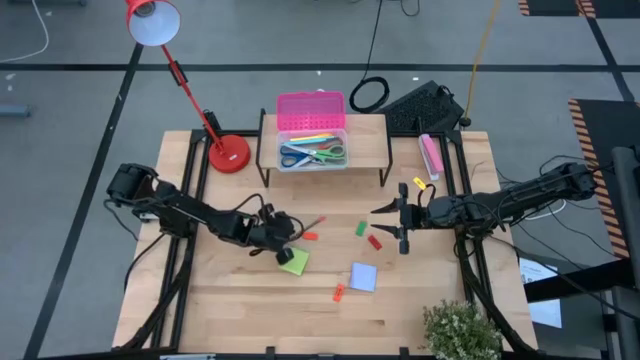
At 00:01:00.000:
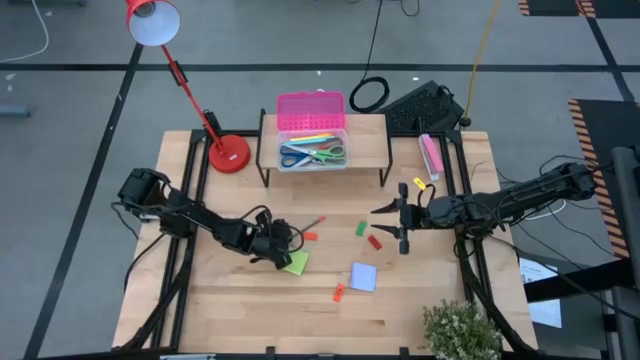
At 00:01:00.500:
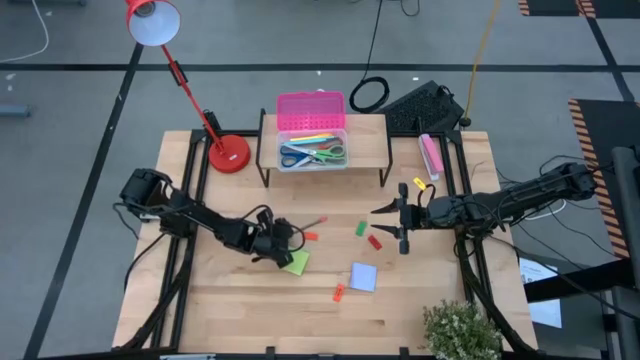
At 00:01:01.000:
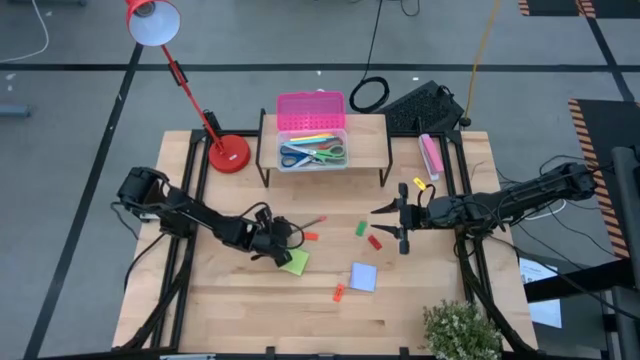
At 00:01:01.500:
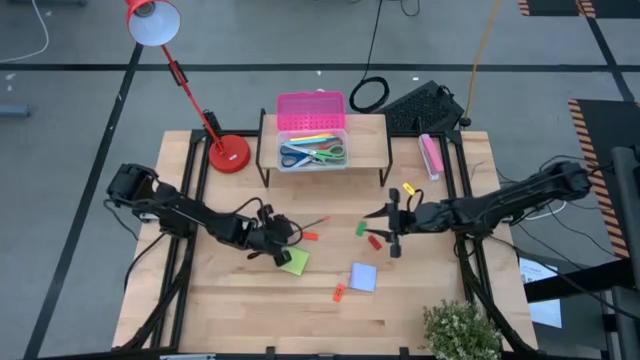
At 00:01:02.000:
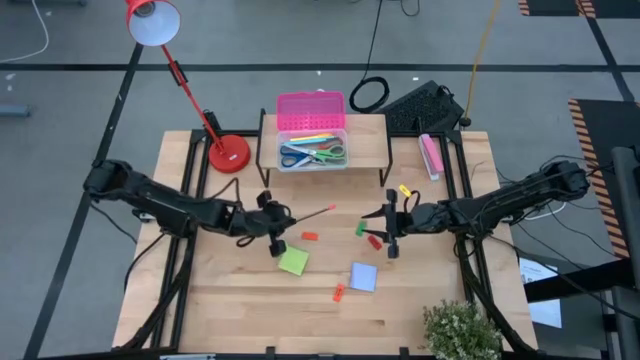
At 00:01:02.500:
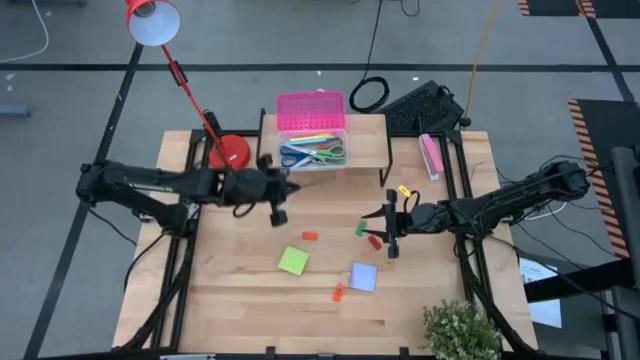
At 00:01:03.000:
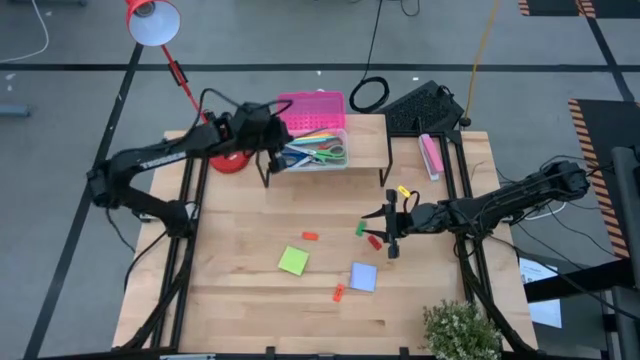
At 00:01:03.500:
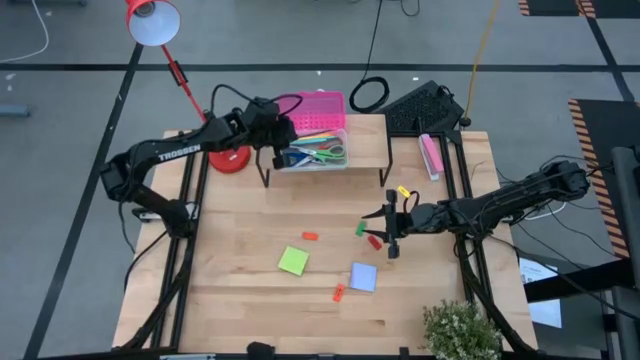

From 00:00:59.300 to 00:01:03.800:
Task: Pack school essentials
Put the black pencil into the pink supply box on the shelf

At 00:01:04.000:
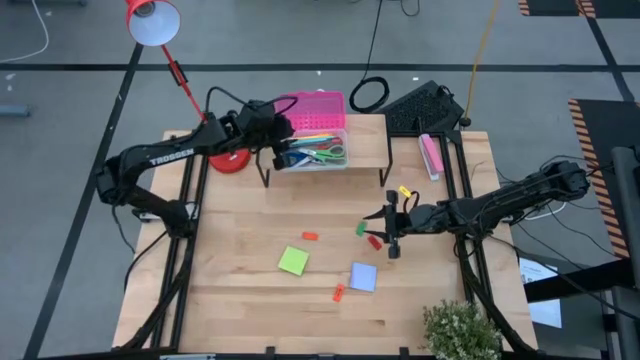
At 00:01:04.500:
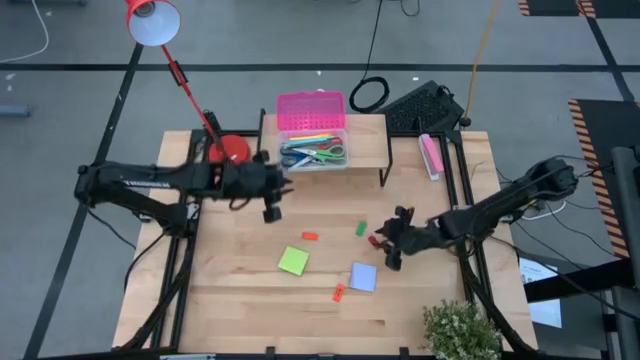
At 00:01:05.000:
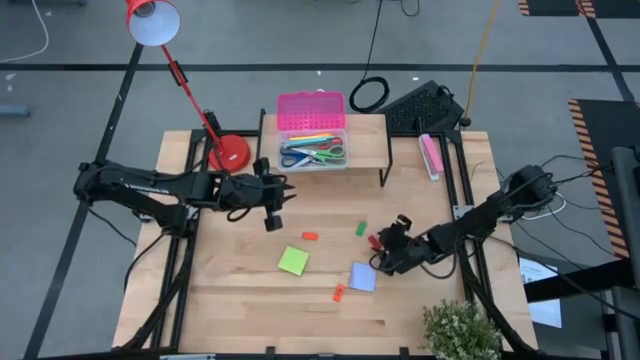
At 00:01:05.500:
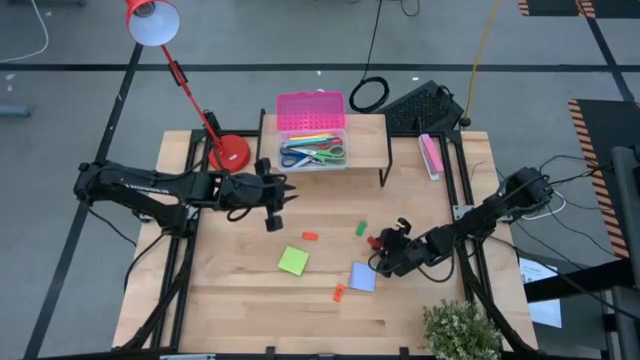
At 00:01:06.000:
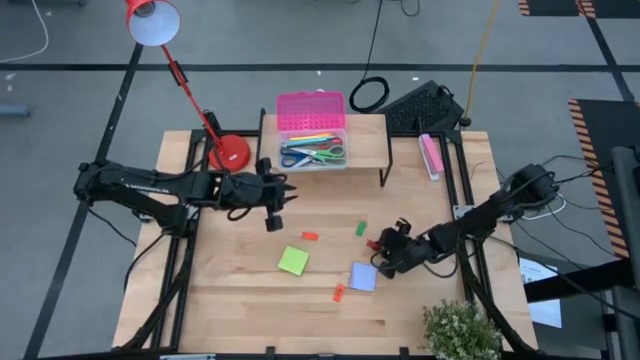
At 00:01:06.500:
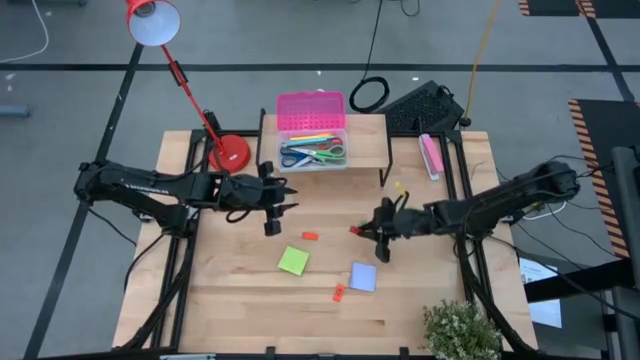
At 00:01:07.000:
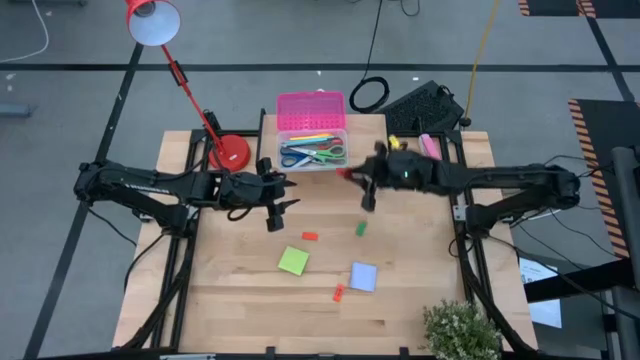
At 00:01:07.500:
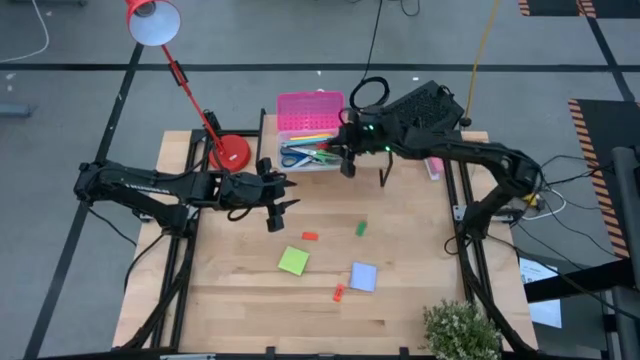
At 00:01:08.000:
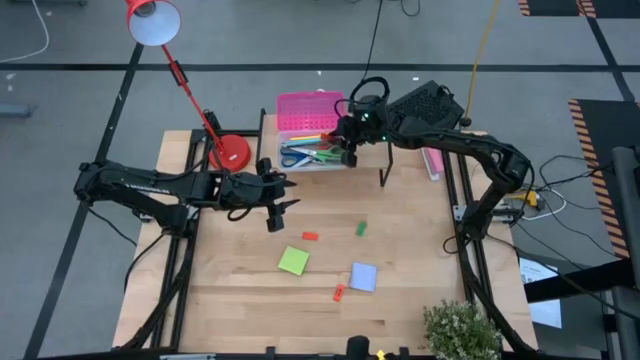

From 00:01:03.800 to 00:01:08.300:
Put the red eraser into the pink supply box on the shelf

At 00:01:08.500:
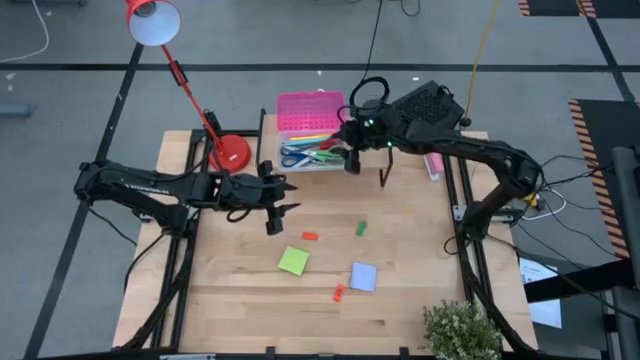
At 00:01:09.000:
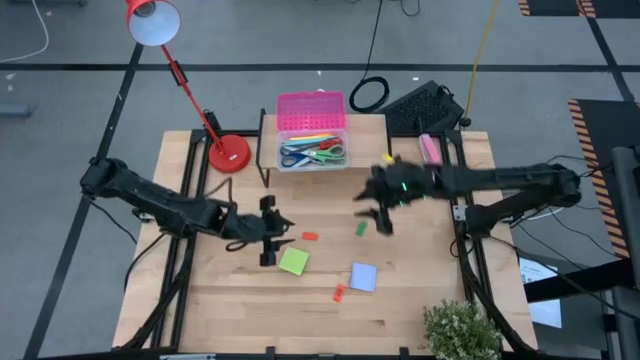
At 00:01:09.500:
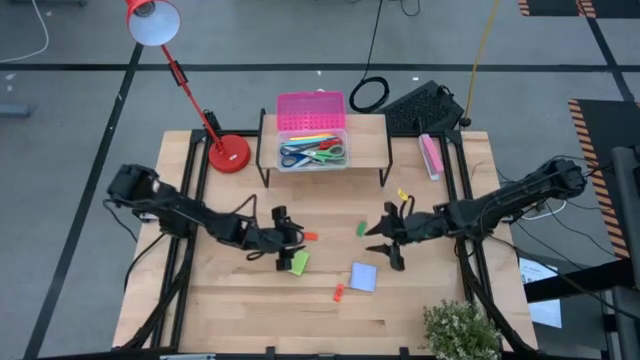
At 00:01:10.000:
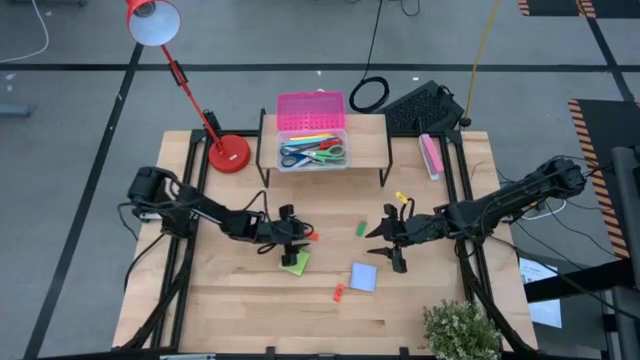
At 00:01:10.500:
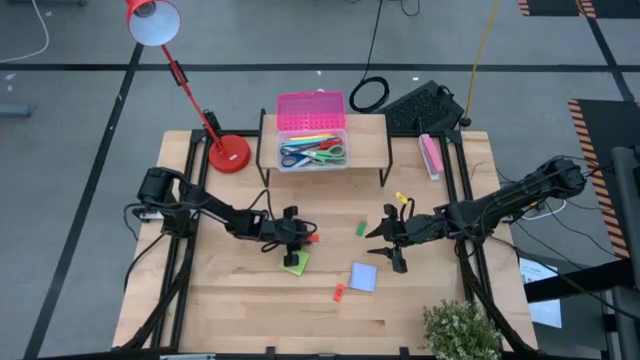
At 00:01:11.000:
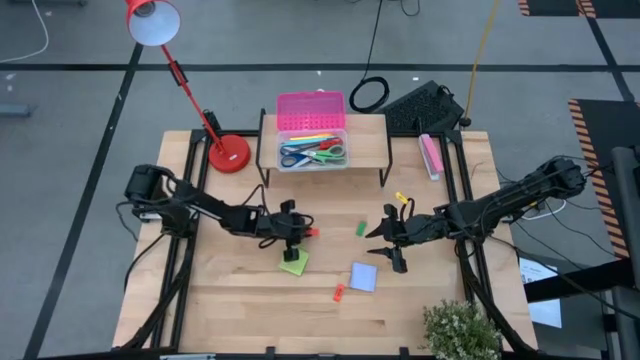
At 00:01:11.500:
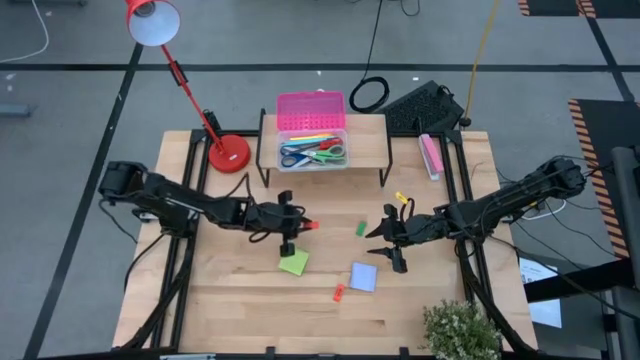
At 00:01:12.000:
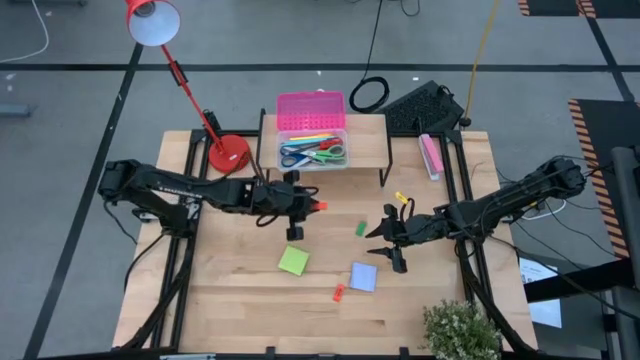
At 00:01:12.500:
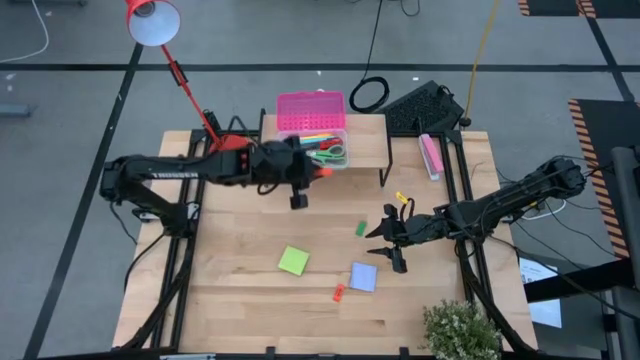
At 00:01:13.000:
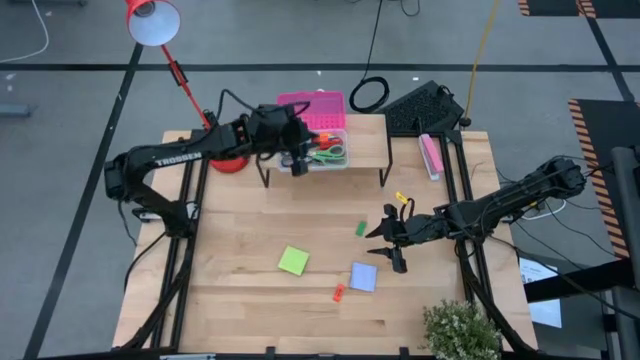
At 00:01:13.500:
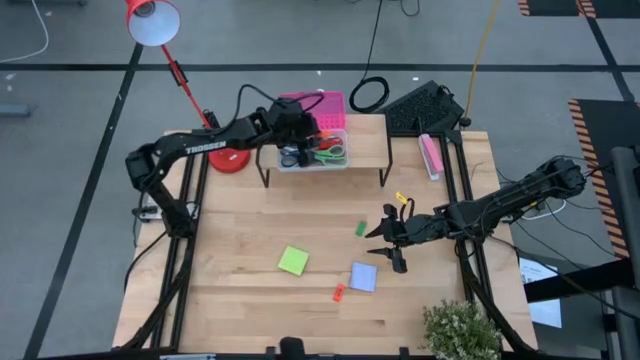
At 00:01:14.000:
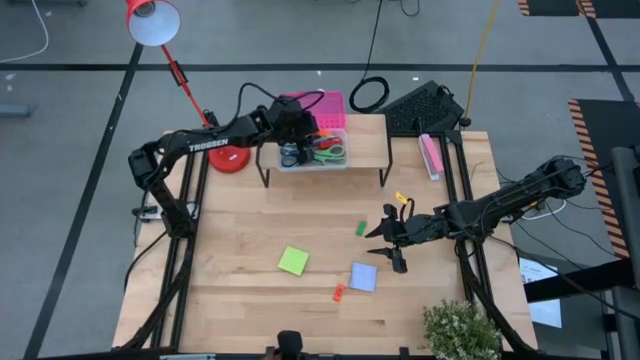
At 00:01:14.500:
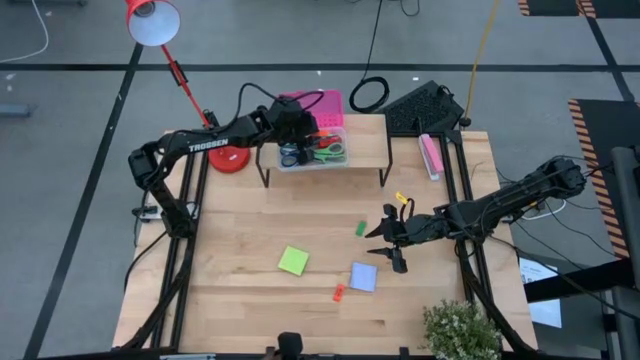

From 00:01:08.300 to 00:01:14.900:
Put the orange eraser into the pink supply box on the shelf

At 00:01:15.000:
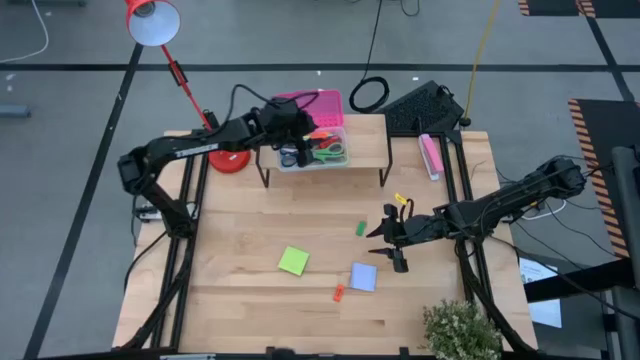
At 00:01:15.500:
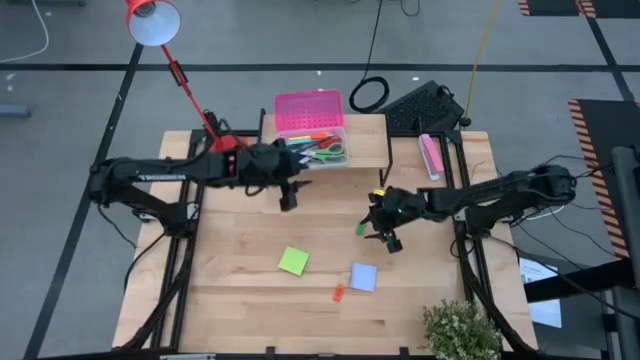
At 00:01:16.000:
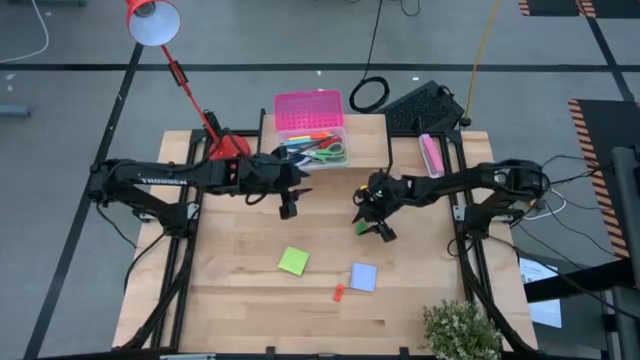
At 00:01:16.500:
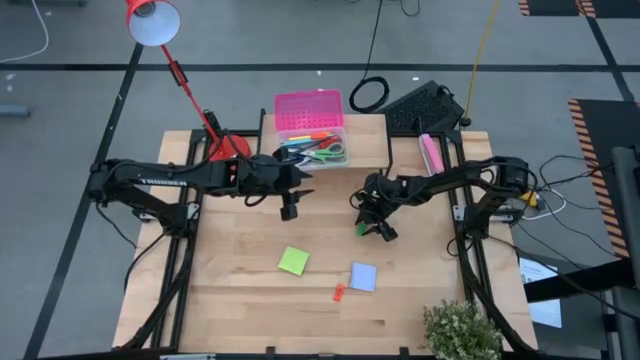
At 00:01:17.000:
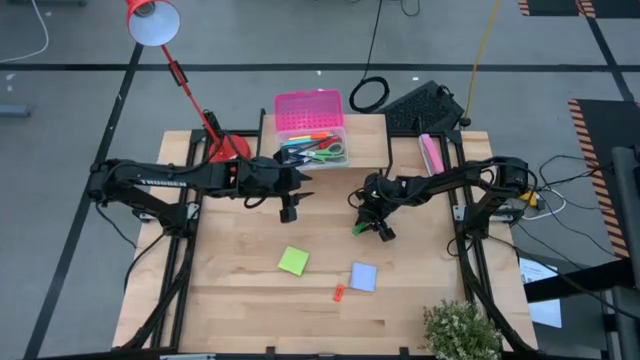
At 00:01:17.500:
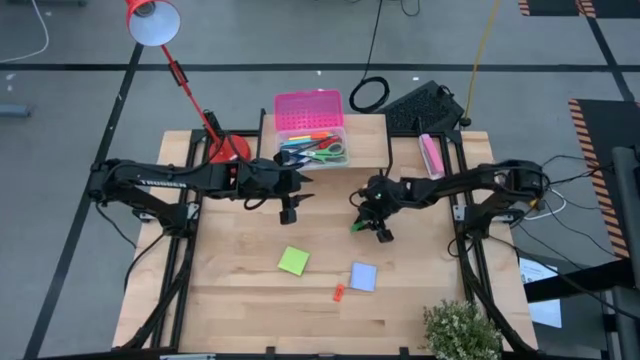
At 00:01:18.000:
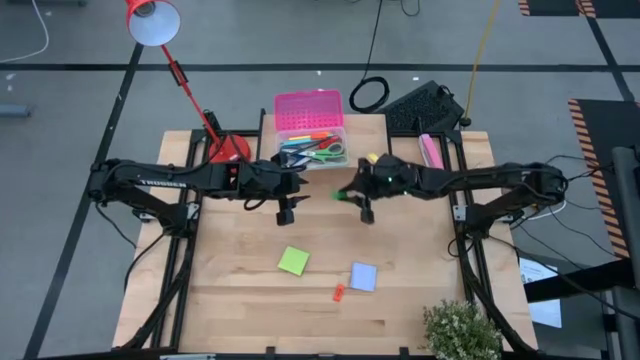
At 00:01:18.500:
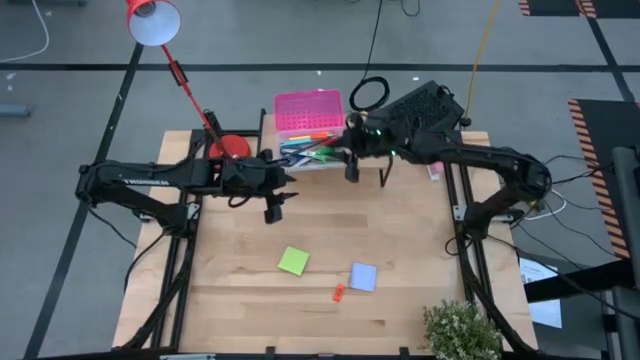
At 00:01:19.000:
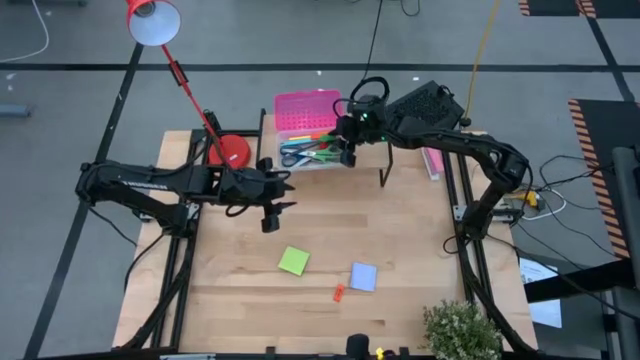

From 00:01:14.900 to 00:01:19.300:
Put the green eraser into the pink supply box on the shelf

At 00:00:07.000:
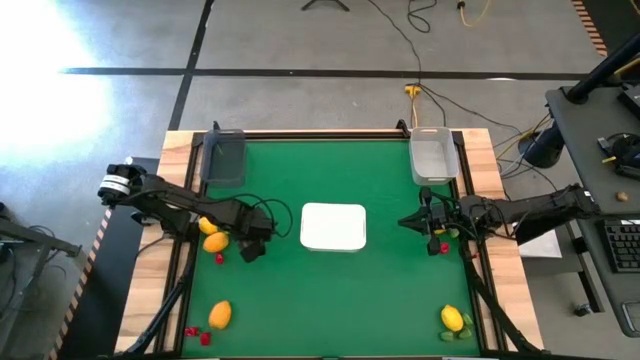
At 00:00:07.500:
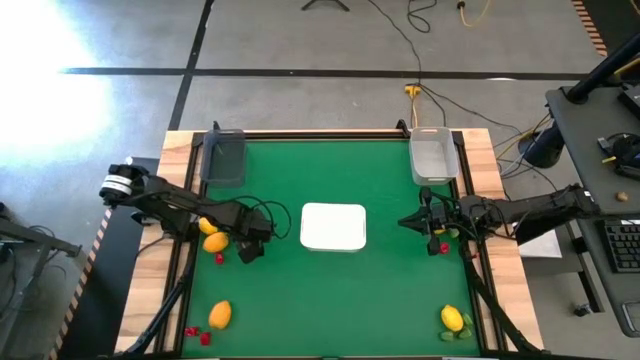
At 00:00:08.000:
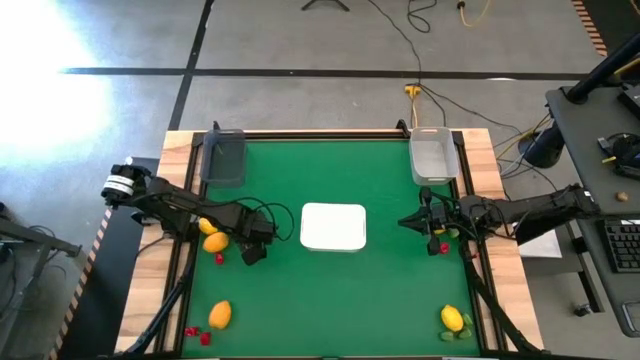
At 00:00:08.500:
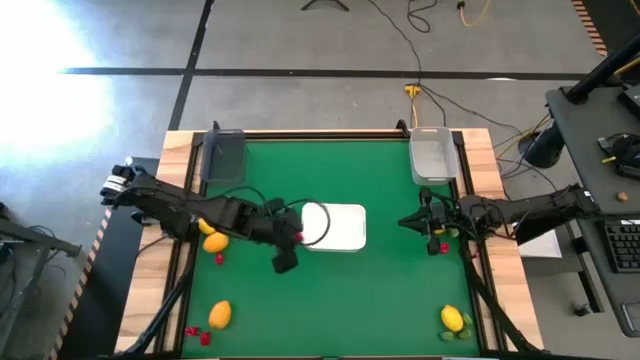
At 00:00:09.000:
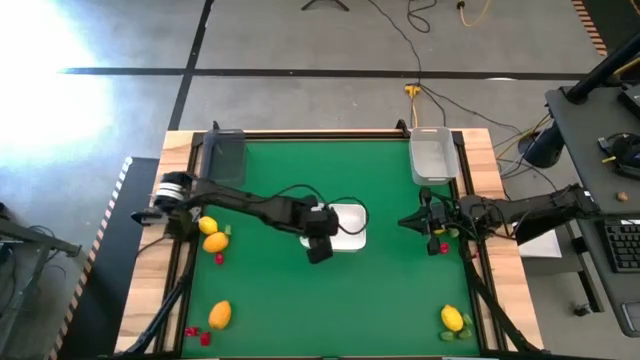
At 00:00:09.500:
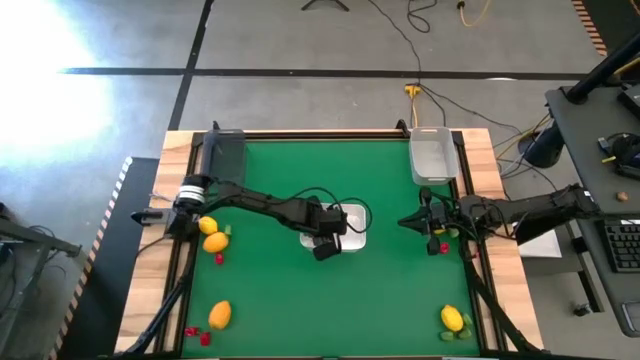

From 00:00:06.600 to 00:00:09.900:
Task: Sort produce into baskets
Put the red chili pepper into the white bin
